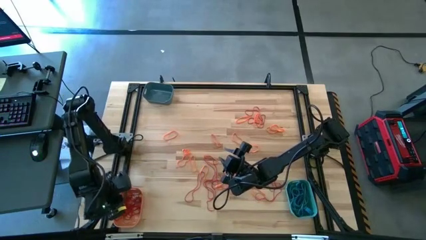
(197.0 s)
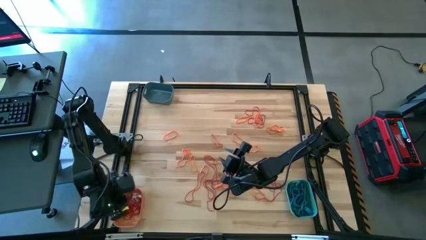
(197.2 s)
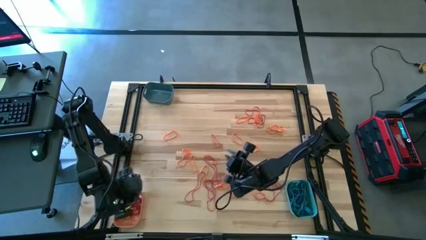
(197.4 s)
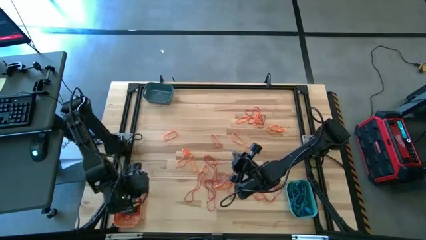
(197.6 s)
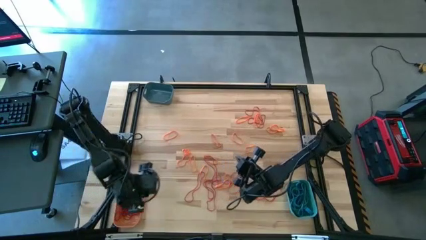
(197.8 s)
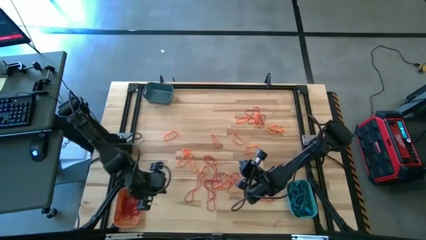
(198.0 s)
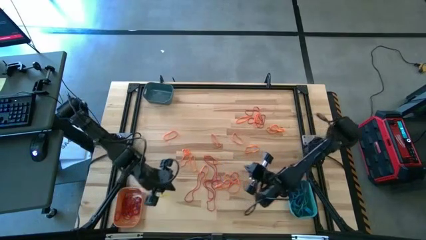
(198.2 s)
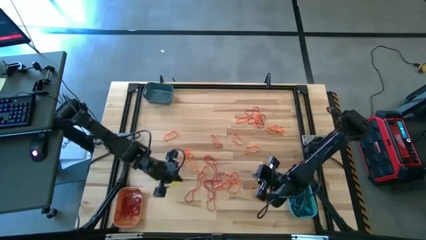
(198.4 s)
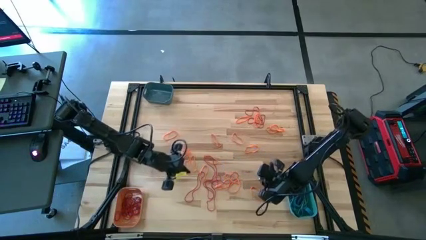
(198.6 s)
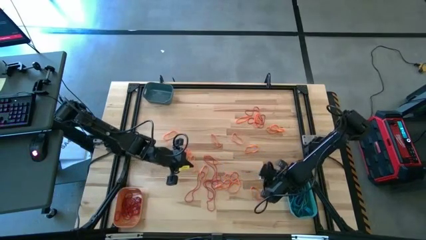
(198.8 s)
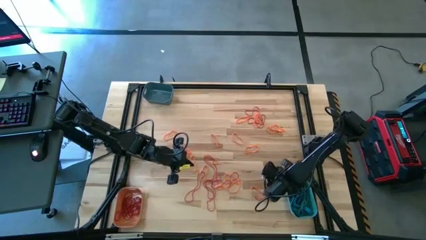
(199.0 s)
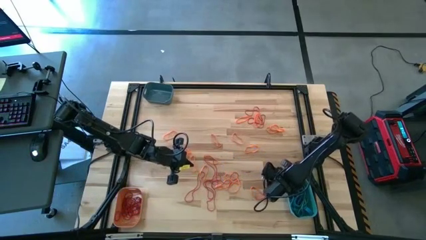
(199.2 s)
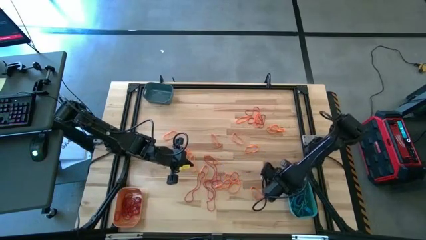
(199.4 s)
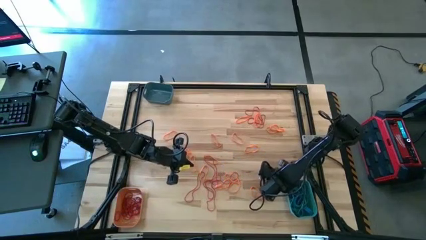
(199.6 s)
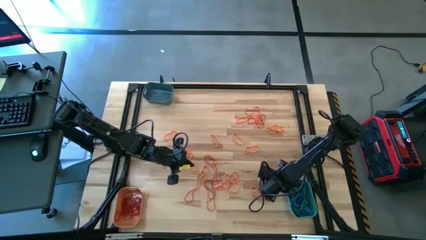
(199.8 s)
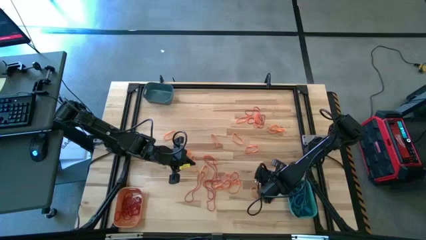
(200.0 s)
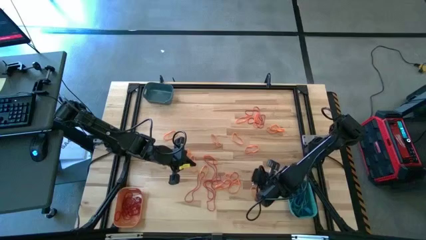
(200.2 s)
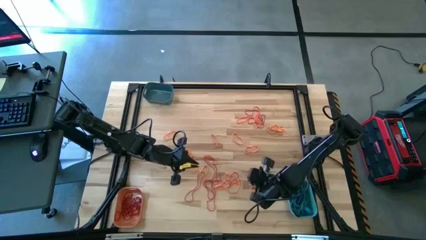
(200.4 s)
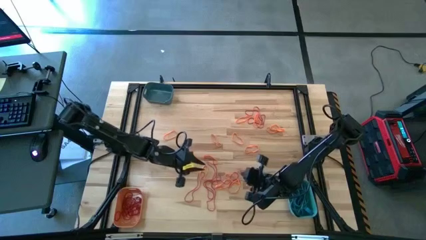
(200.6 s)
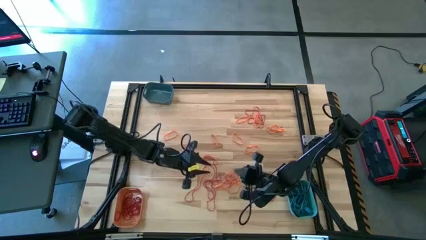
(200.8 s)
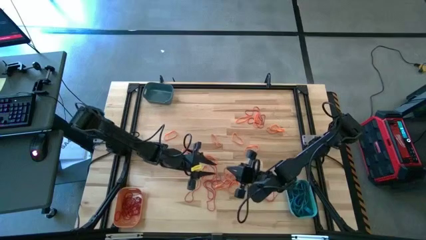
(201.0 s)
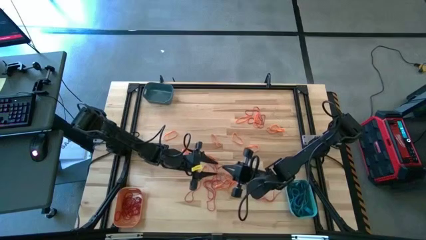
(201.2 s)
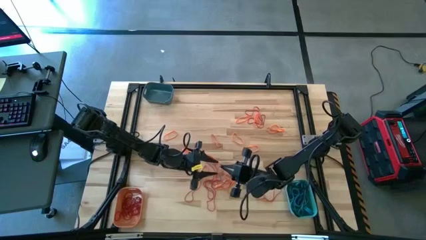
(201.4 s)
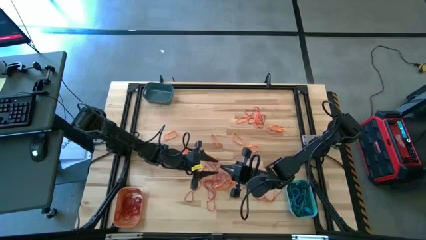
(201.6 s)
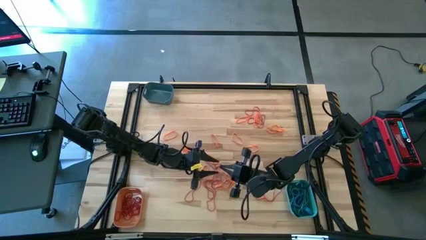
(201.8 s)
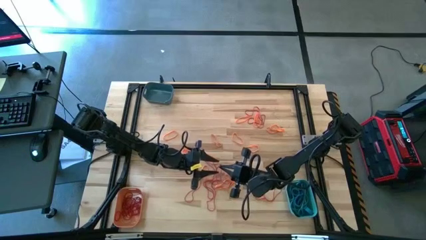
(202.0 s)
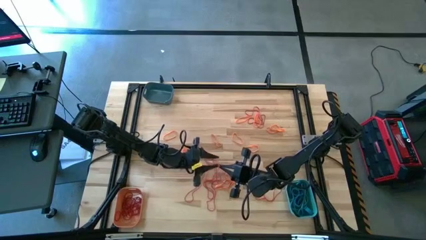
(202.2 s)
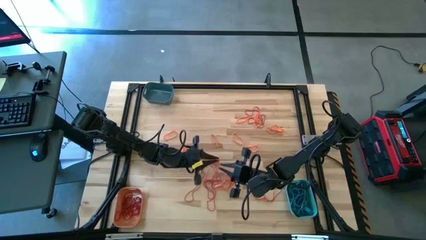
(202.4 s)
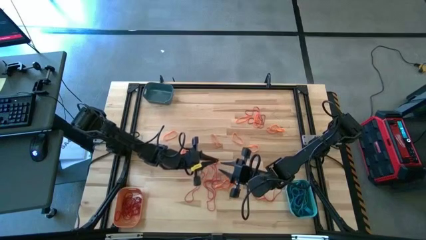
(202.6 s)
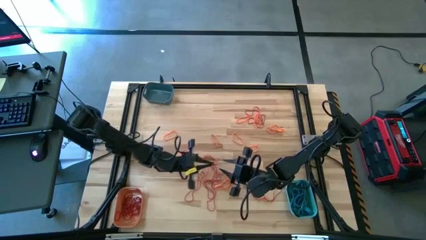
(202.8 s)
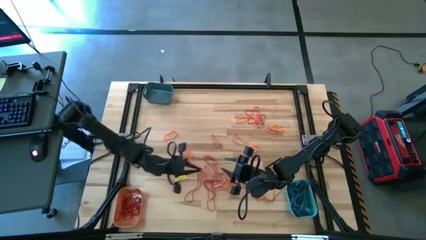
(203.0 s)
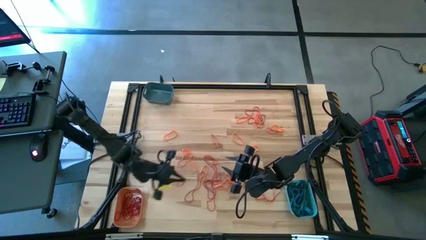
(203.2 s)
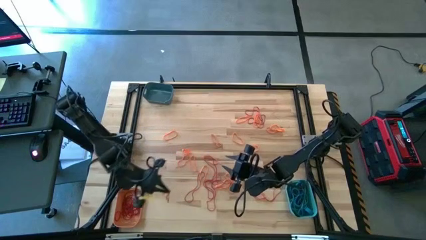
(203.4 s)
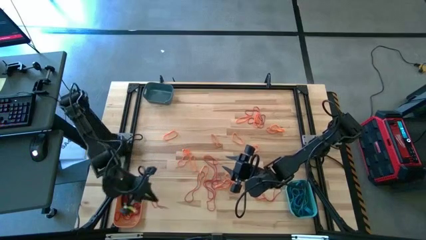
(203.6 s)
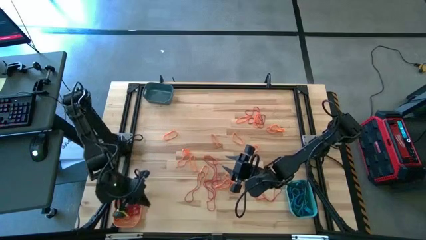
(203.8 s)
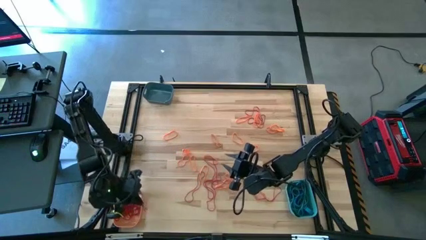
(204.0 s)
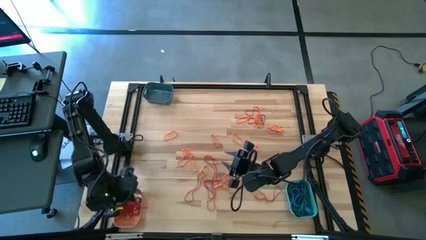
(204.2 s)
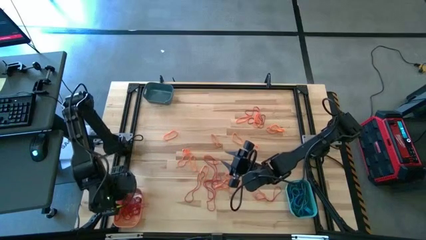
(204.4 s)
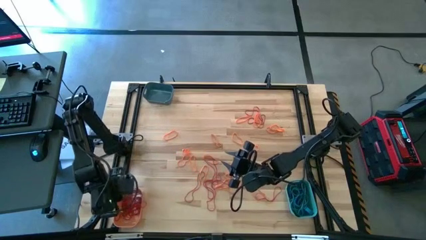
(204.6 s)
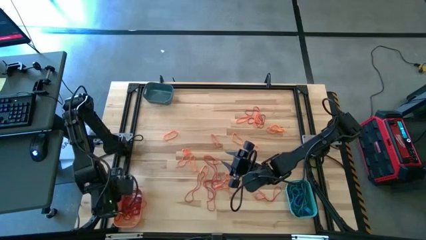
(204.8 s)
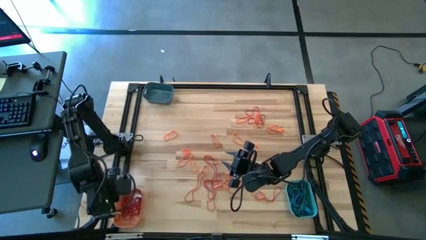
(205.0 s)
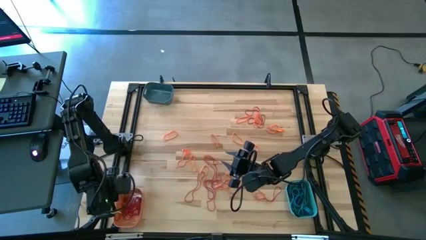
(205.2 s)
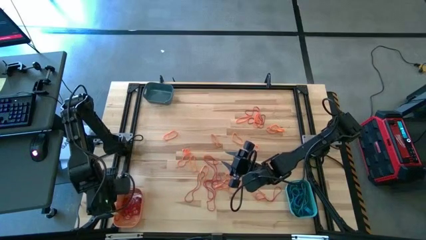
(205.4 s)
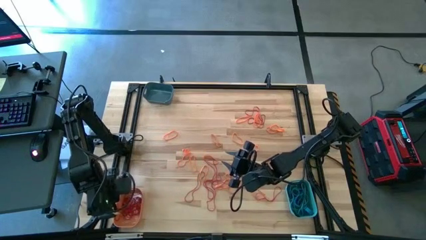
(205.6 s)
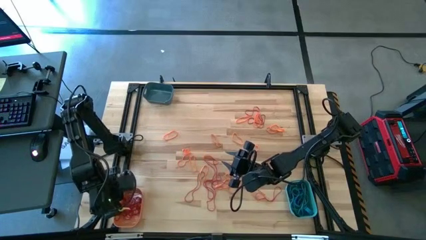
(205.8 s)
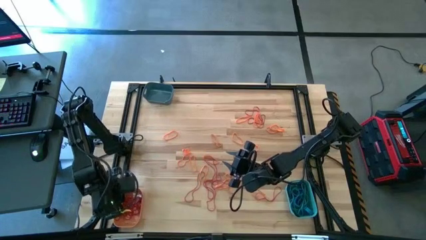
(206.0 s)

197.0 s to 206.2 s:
Task: Sort rubber bands into baskets
Put the red rubber band into the orange bin

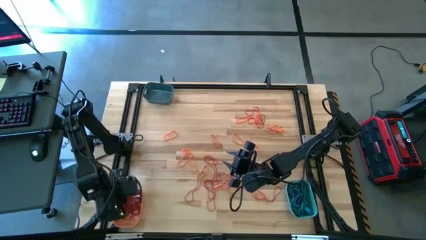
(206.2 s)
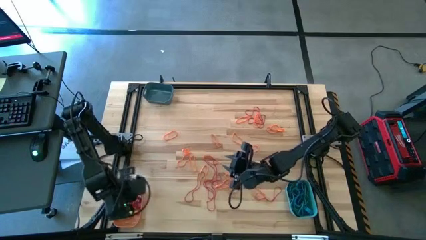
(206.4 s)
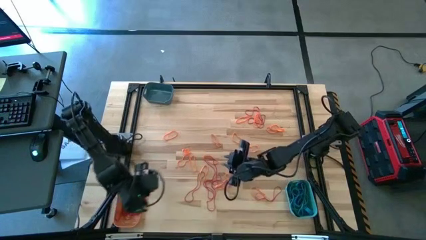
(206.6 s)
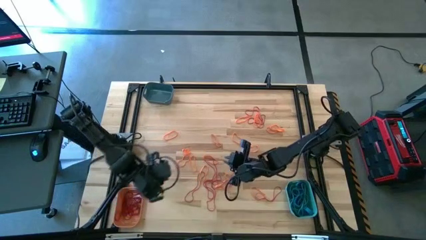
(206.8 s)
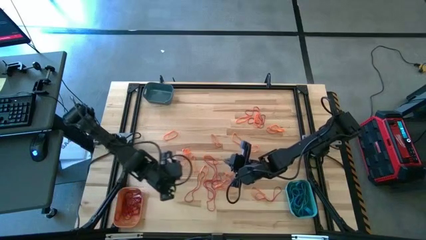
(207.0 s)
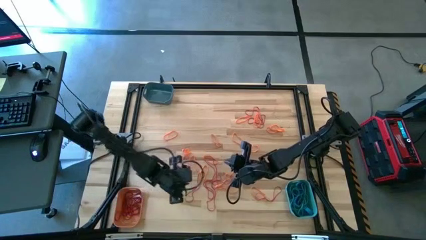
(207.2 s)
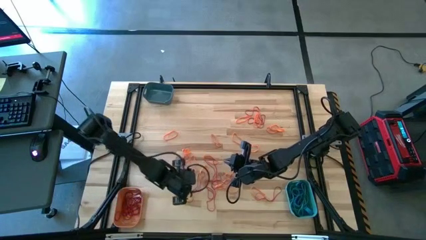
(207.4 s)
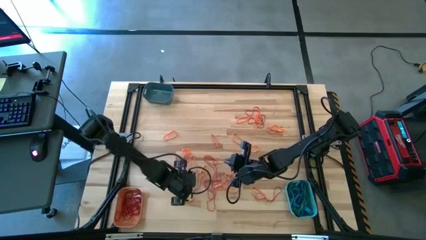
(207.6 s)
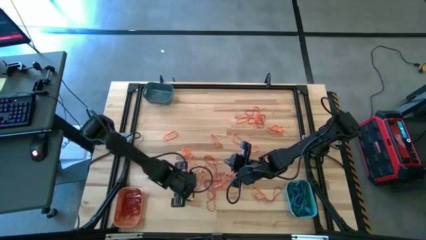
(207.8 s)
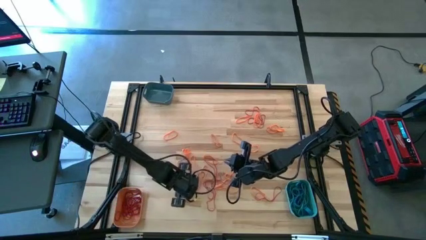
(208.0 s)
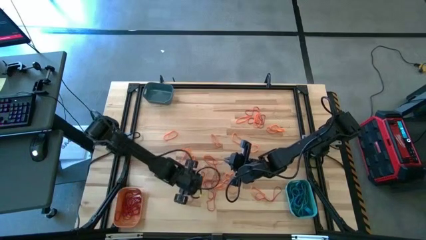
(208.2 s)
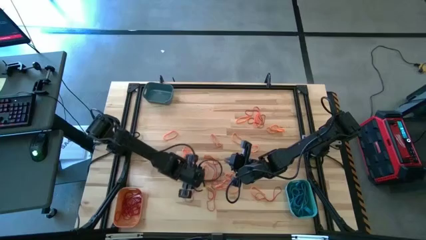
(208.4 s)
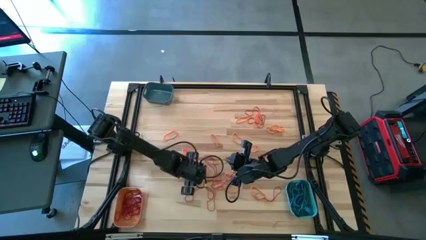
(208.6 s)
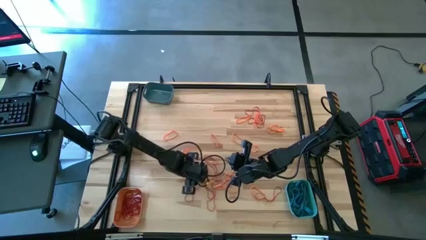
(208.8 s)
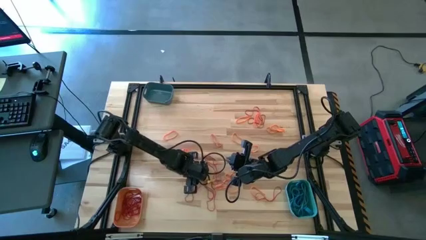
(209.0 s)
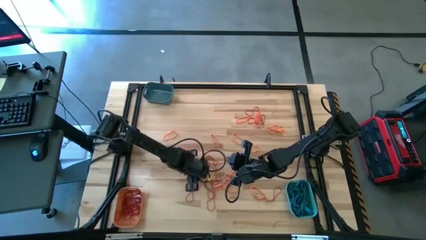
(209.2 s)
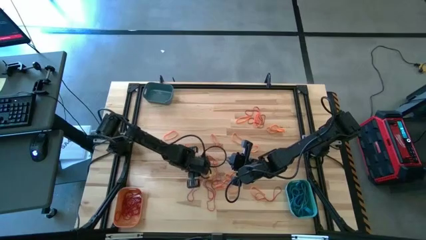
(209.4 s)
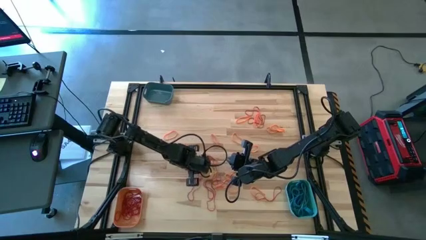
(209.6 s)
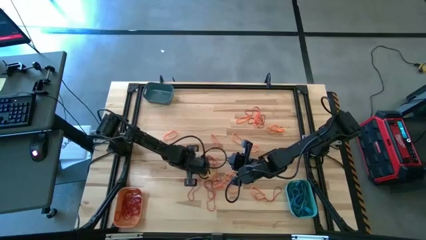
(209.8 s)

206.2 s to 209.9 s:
Put the red rubber band into the orange bin

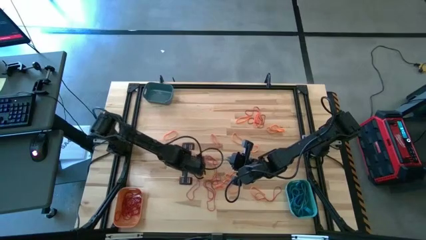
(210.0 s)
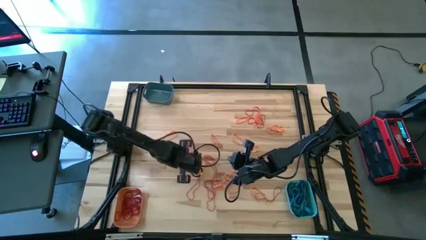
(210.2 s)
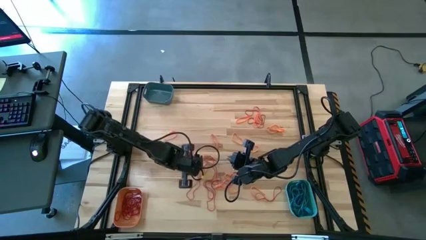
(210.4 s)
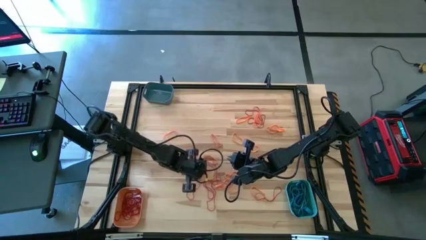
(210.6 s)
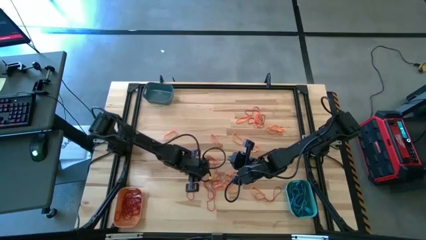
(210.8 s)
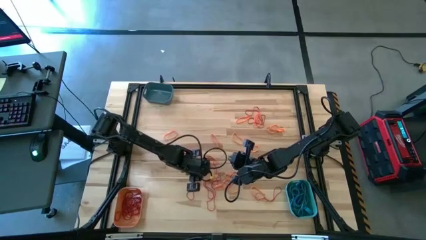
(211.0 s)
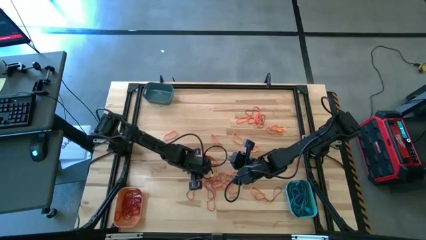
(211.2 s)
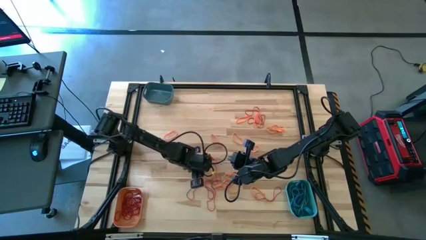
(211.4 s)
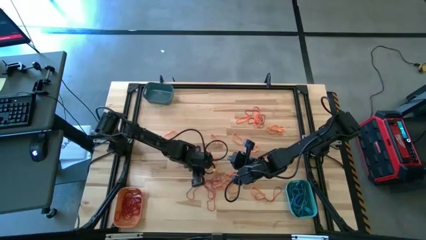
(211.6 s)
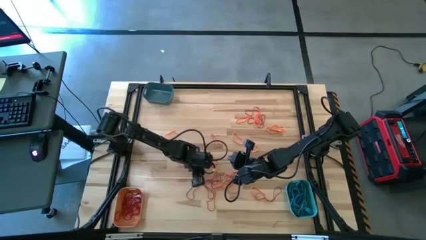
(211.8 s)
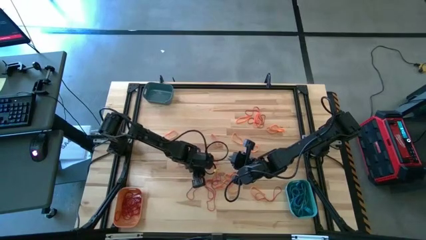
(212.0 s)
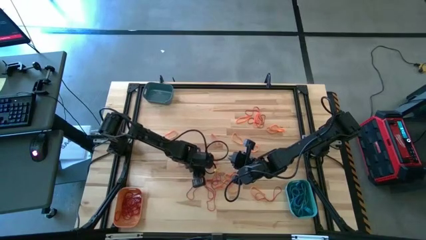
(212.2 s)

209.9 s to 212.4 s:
Put the red rubber band into the orange bin
